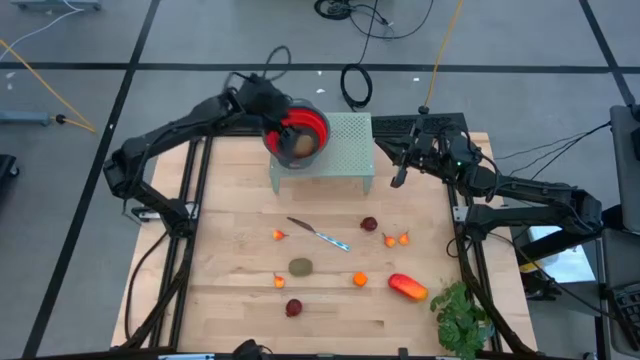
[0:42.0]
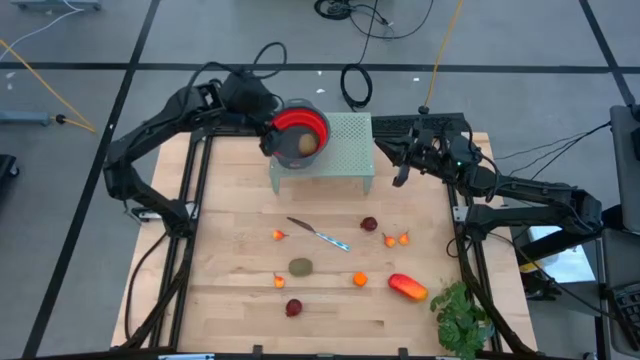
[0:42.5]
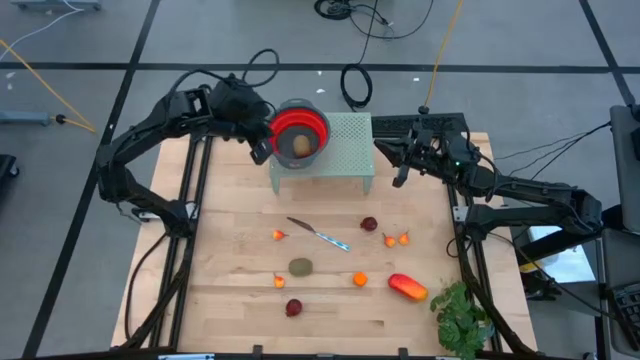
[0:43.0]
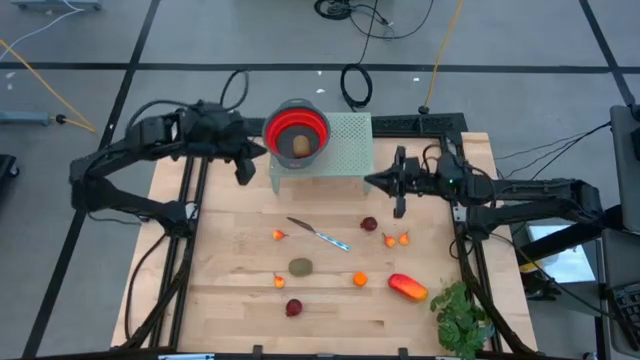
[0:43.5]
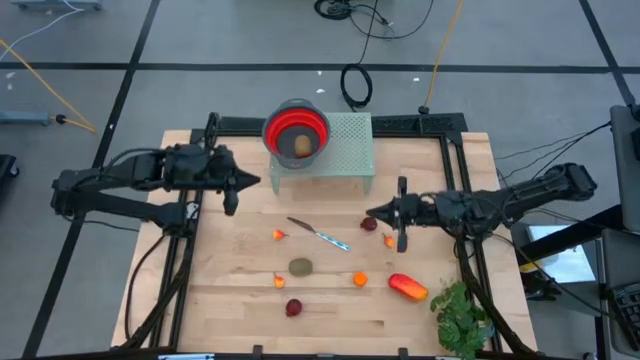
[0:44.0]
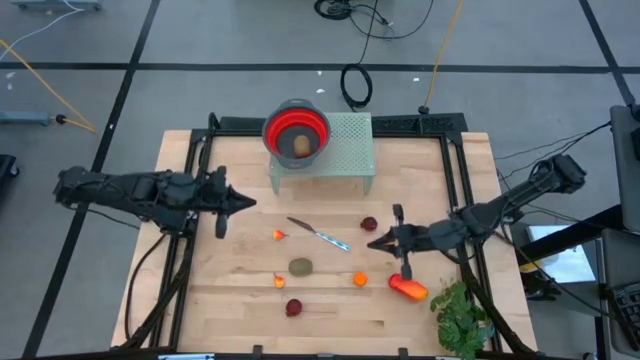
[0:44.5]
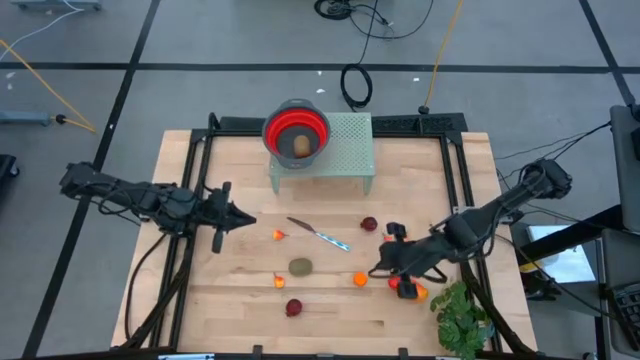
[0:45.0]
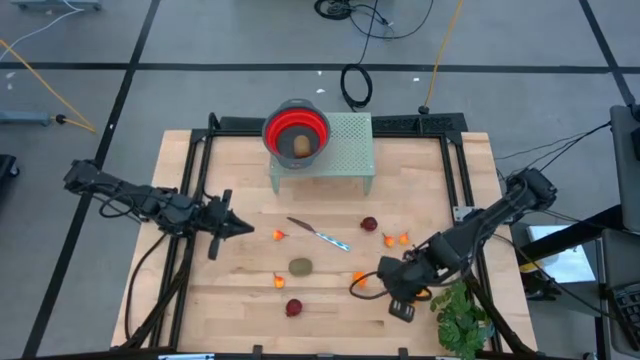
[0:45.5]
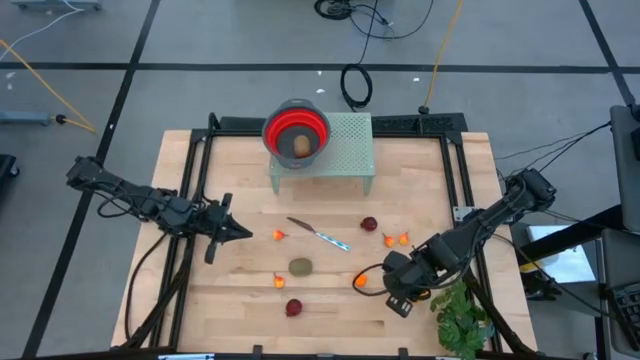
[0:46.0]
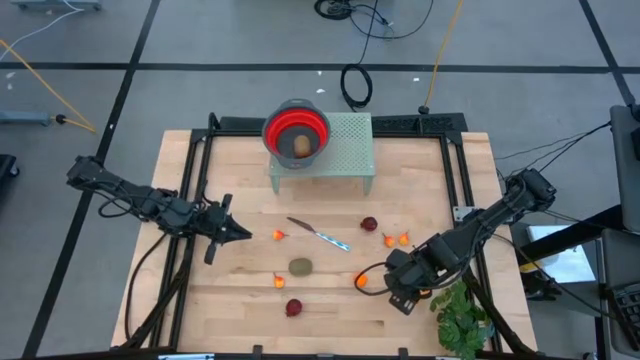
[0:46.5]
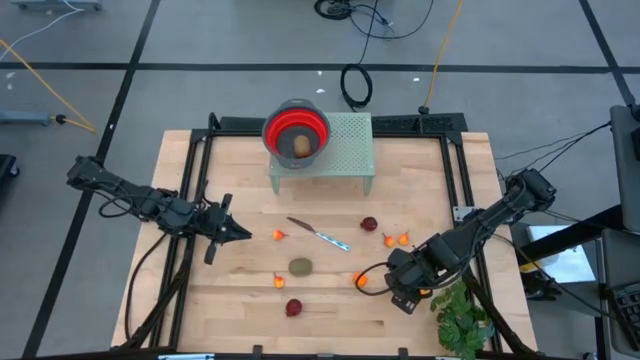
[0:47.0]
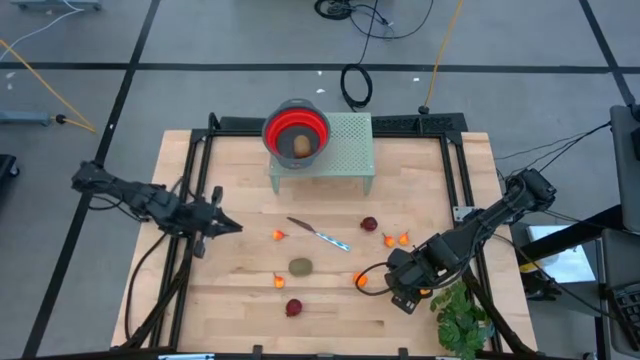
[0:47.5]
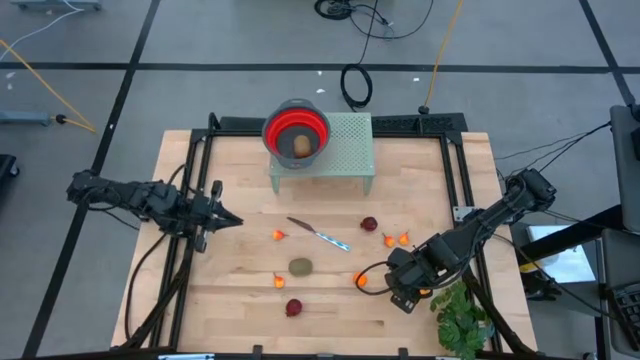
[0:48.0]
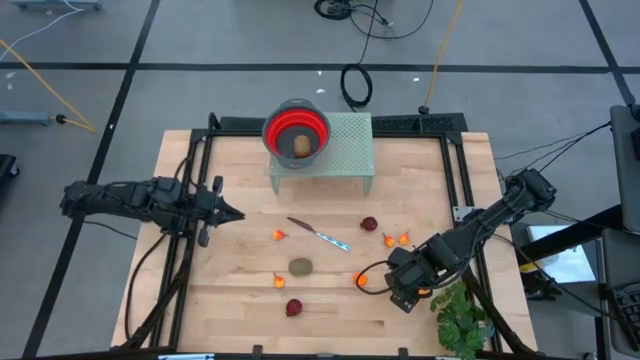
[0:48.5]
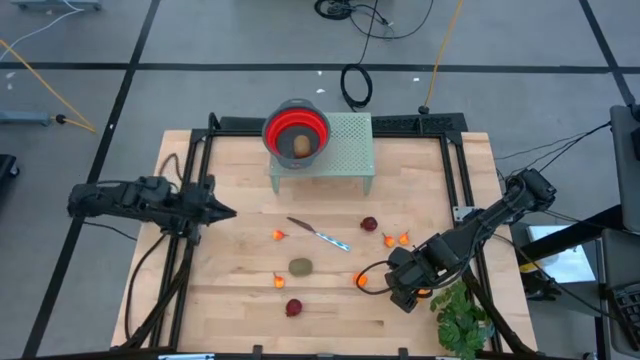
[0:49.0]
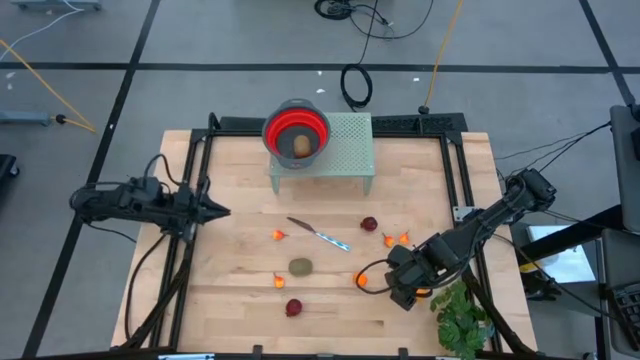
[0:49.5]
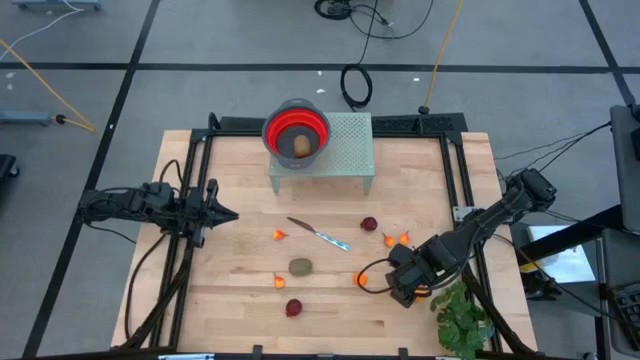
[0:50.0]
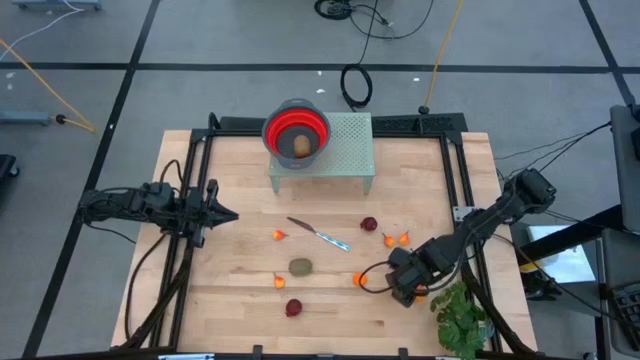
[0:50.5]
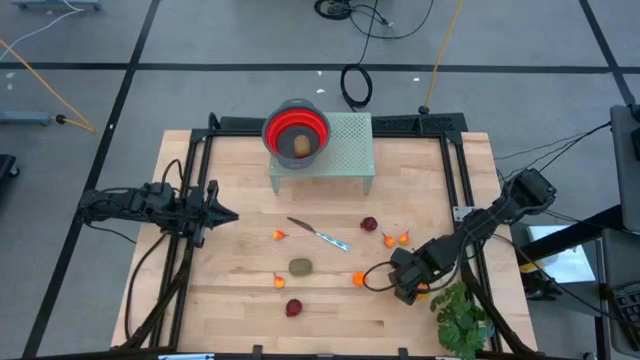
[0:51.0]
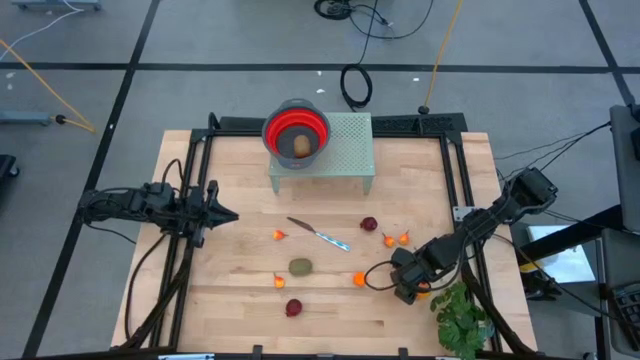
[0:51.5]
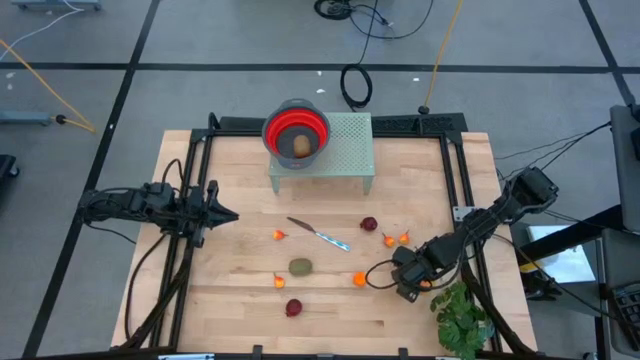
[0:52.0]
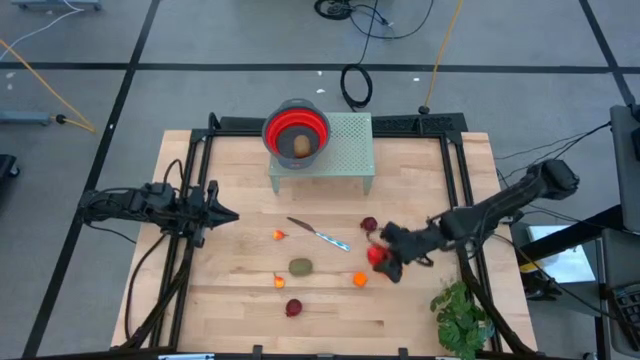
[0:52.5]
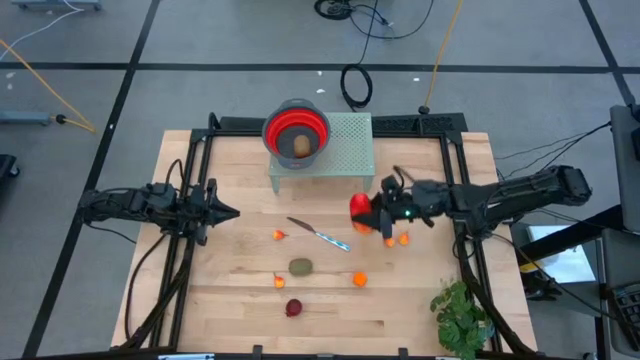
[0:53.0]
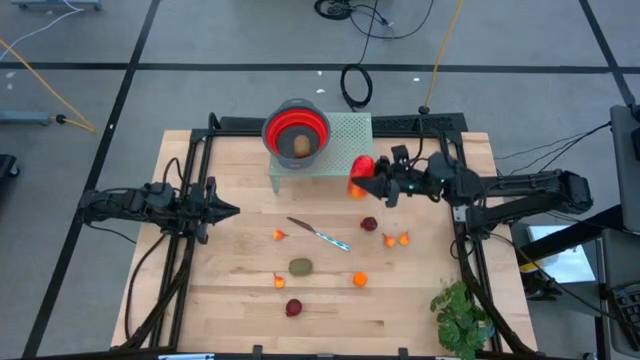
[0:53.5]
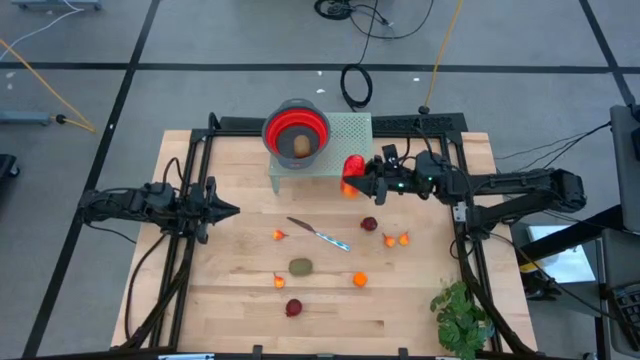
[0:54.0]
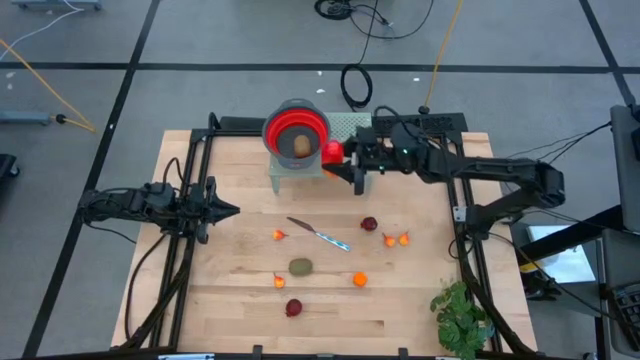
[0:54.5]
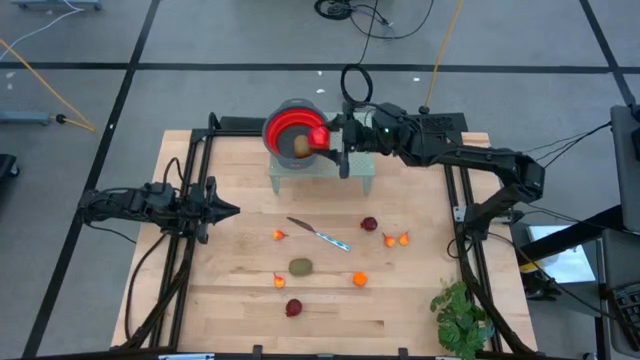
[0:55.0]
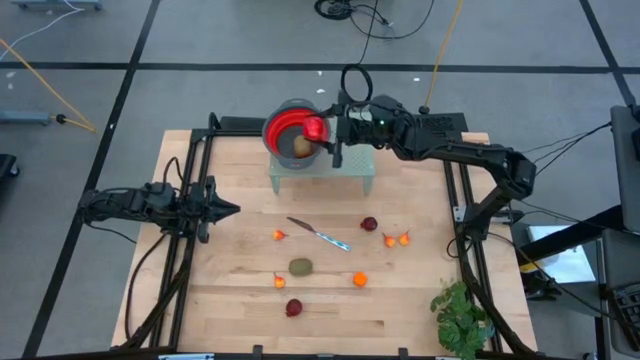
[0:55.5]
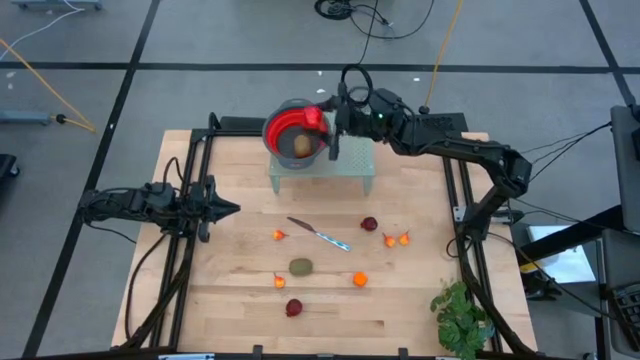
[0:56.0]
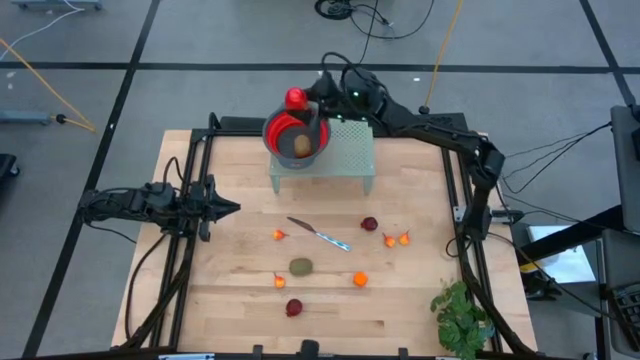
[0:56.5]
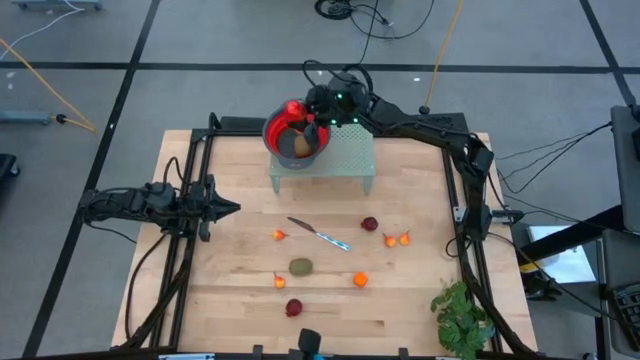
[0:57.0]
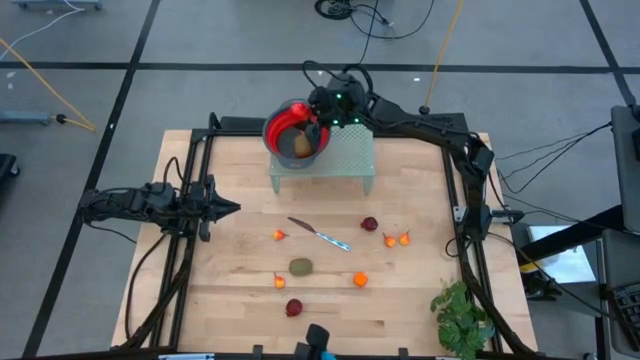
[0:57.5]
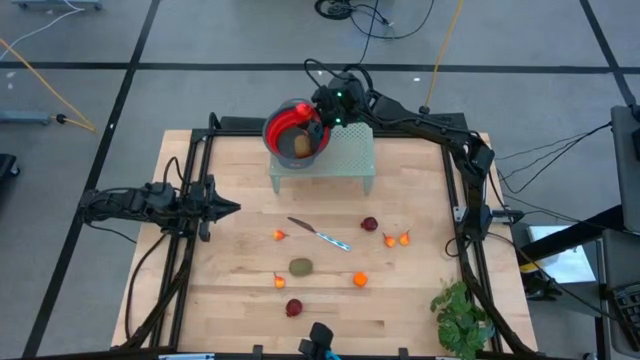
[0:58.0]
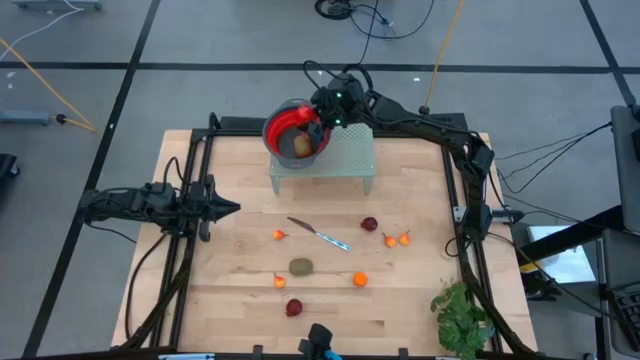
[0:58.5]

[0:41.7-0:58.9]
Task: Pick & Place Fruit
Put the mango into the red strainer bowl

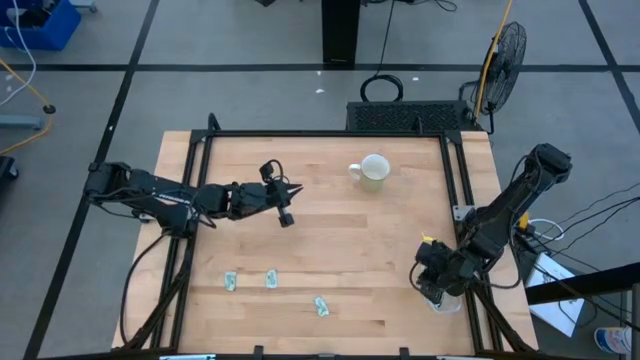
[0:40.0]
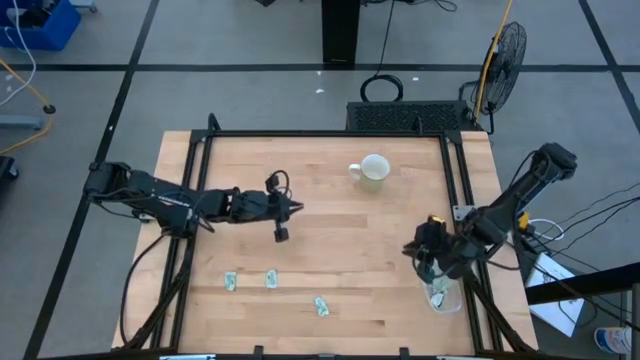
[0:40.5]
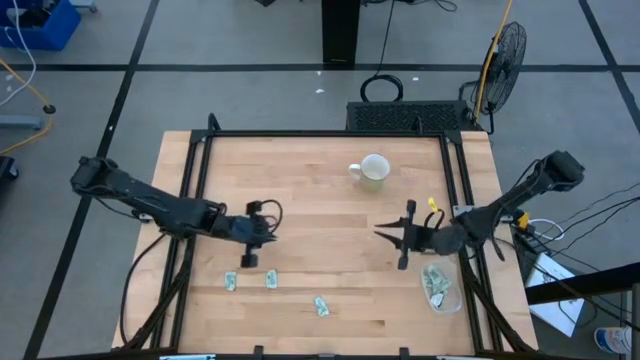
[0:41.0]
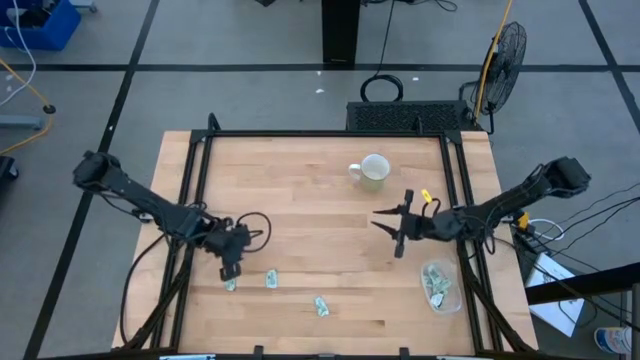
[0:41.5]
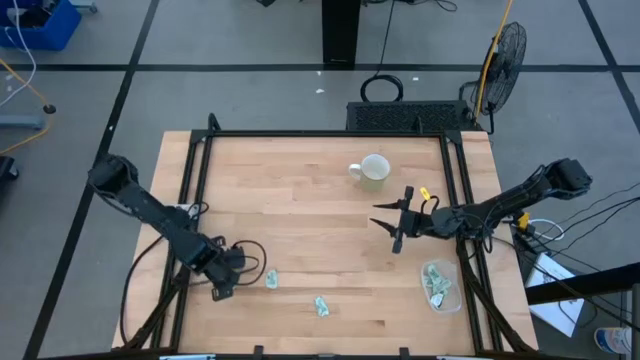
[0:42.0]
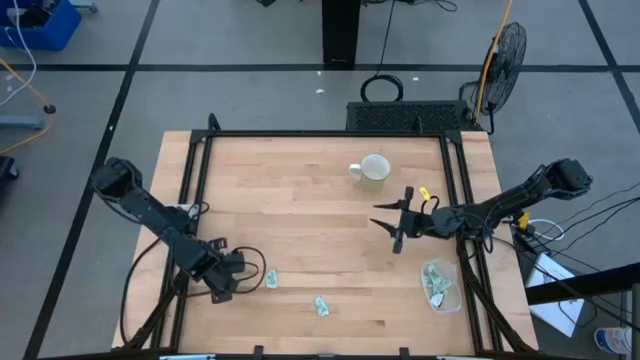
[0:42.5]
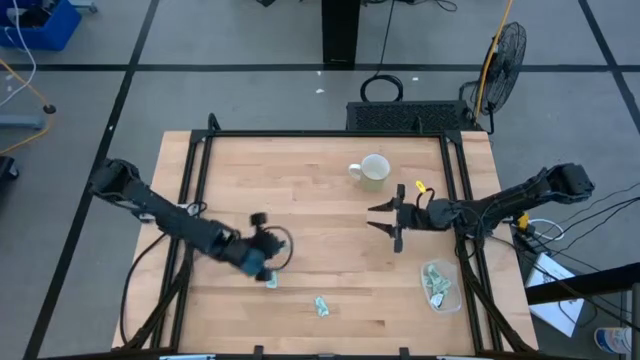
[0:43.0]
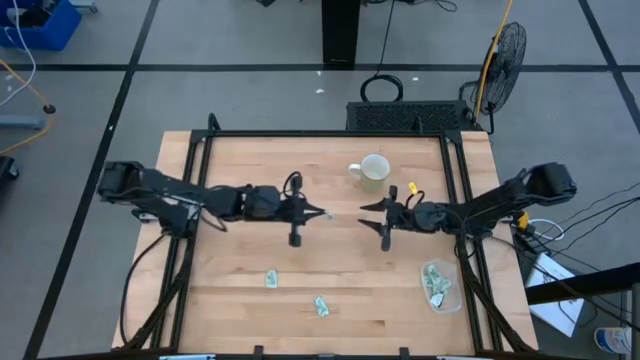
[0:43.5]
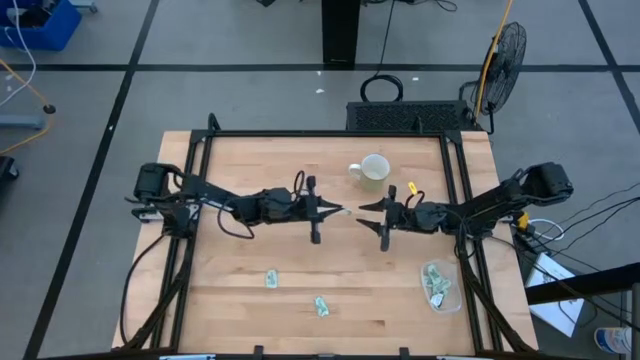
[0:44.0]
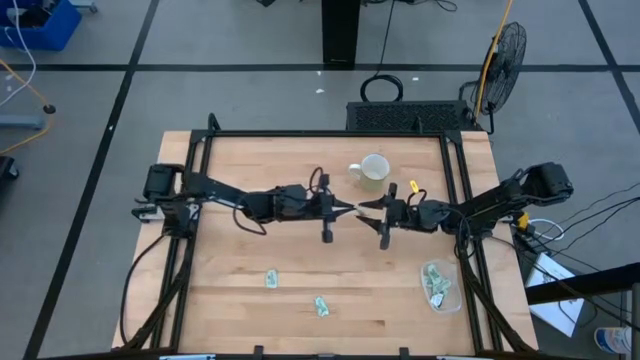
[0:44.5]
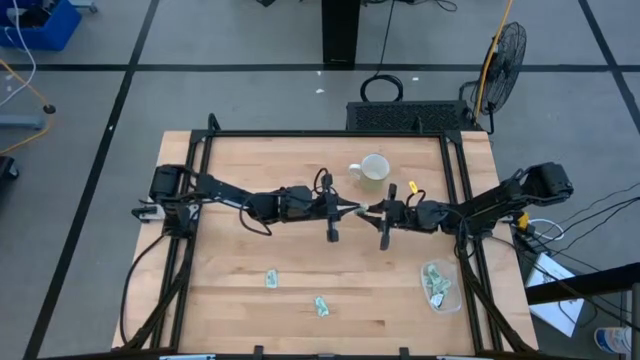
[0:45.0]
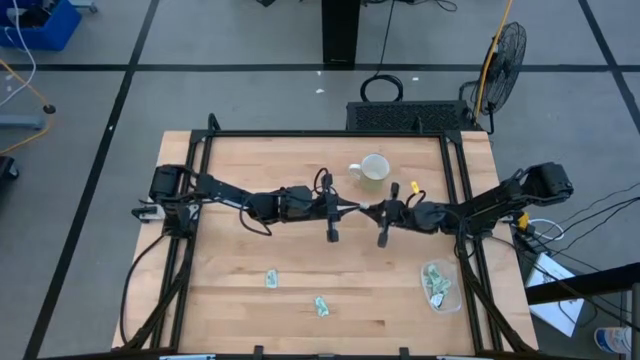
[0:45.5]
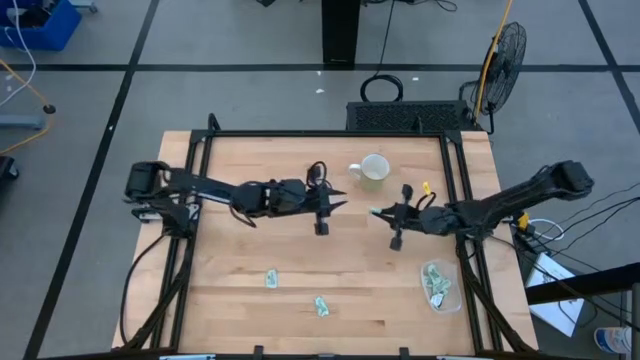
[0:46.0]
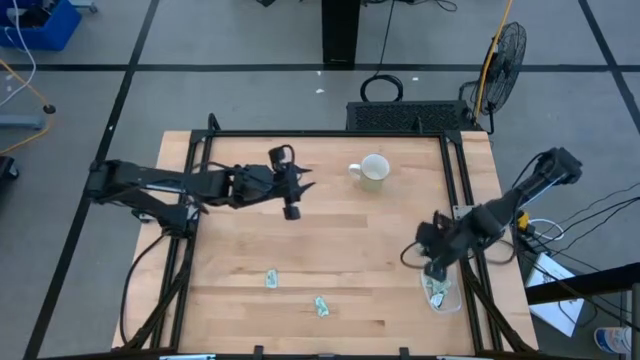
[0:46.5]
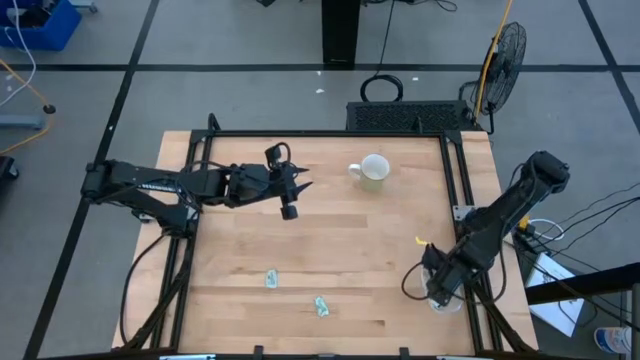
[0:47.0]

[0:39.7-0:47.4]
Task: Pick and place Stevia / Truvia into bins
Put the stevia packet into the transparent bin
